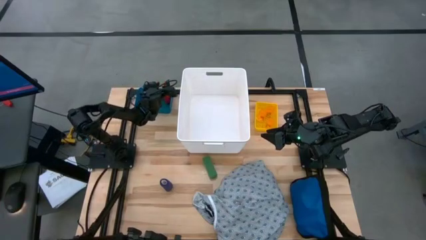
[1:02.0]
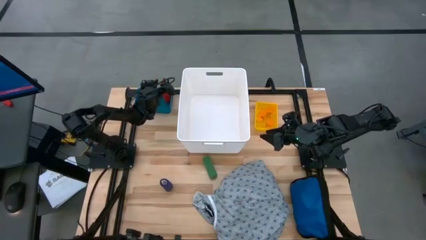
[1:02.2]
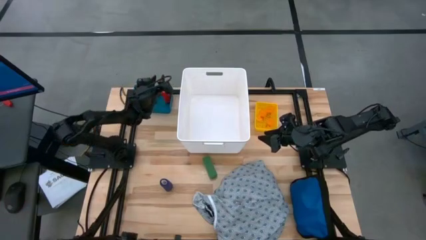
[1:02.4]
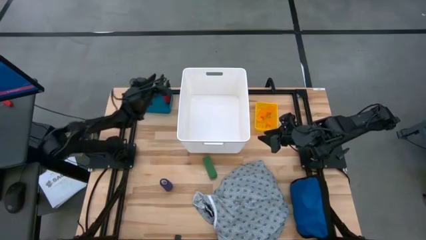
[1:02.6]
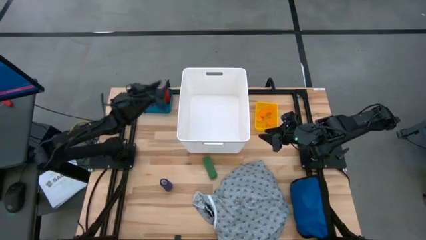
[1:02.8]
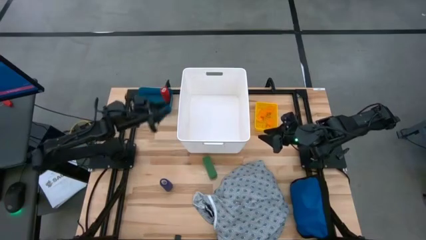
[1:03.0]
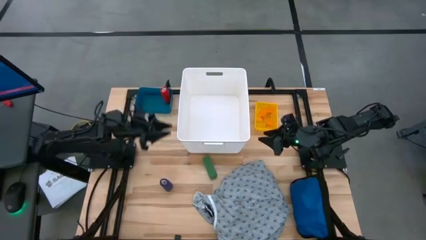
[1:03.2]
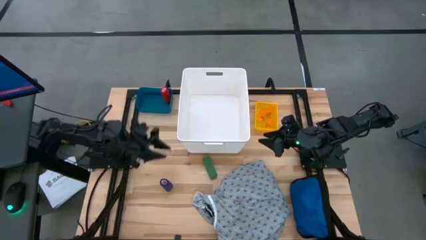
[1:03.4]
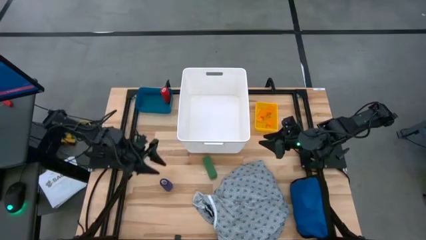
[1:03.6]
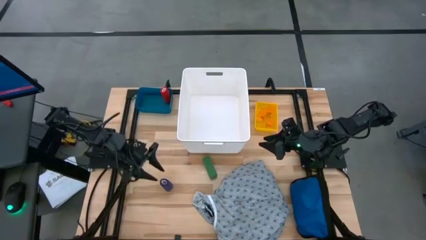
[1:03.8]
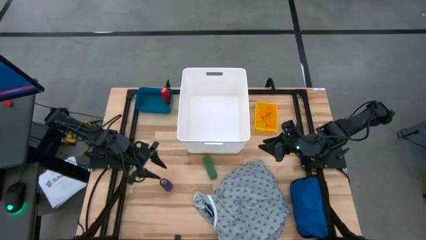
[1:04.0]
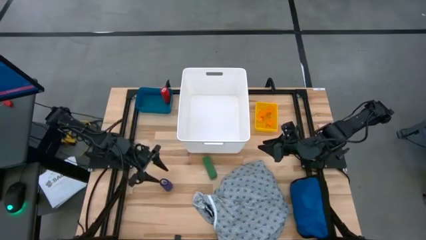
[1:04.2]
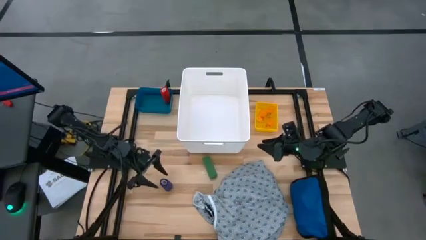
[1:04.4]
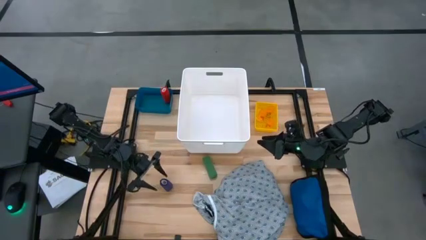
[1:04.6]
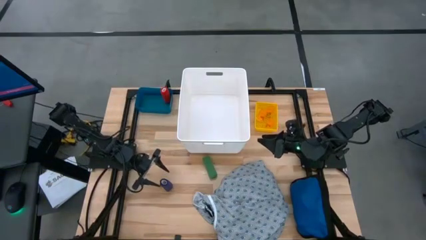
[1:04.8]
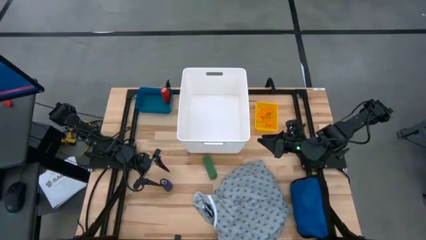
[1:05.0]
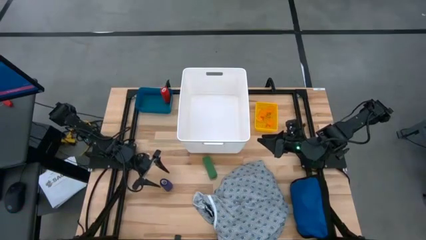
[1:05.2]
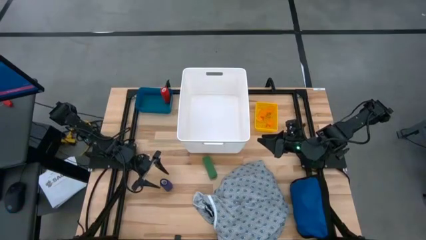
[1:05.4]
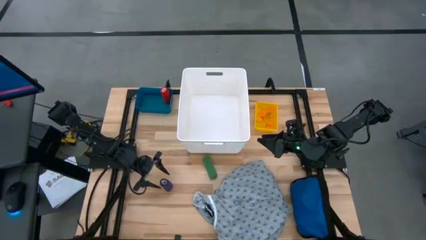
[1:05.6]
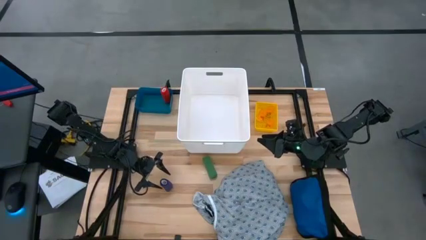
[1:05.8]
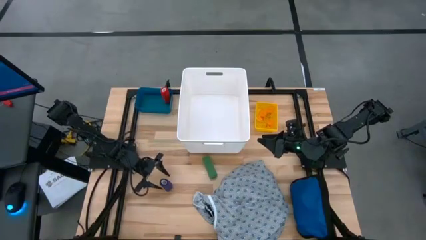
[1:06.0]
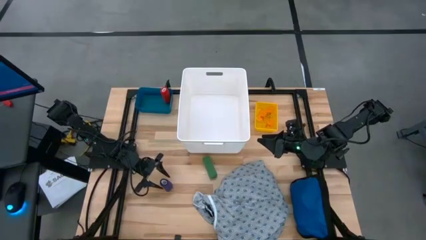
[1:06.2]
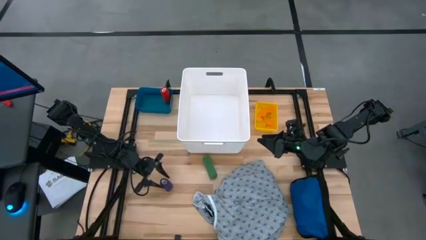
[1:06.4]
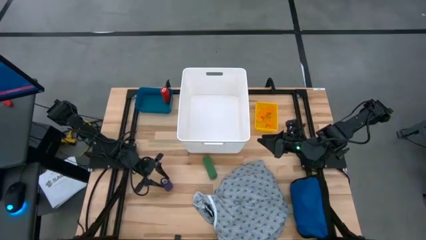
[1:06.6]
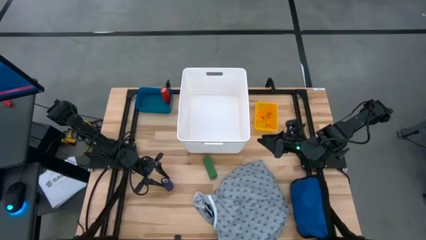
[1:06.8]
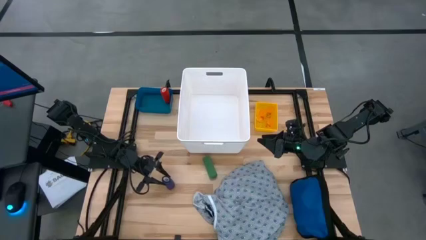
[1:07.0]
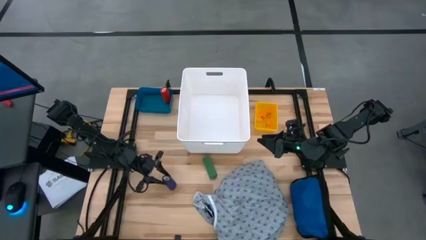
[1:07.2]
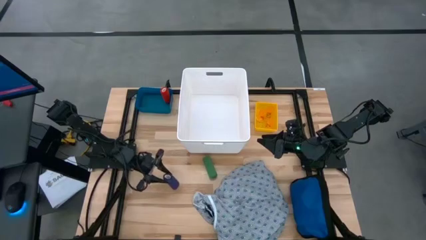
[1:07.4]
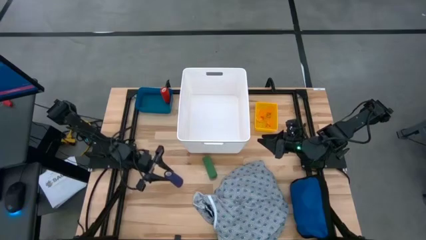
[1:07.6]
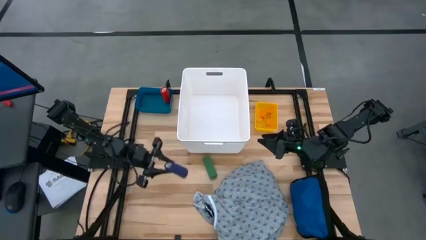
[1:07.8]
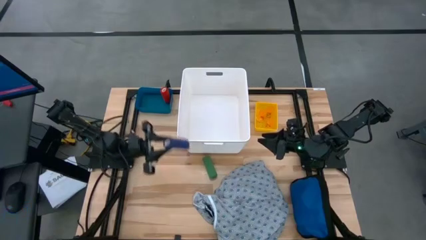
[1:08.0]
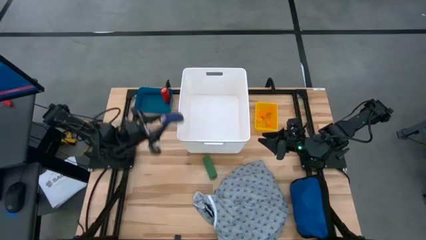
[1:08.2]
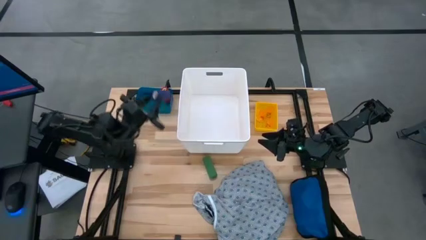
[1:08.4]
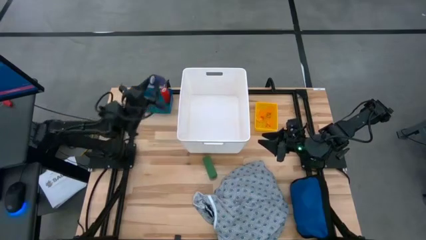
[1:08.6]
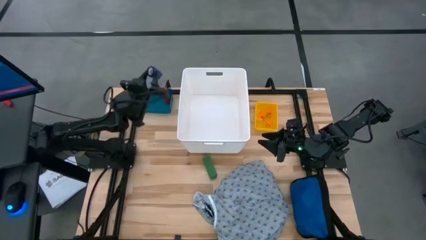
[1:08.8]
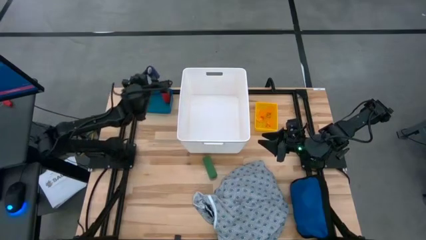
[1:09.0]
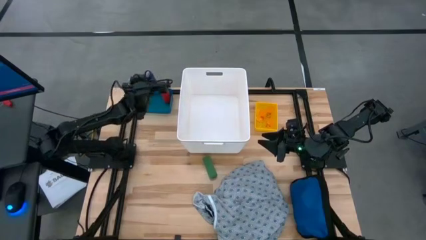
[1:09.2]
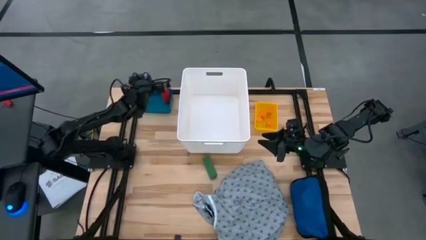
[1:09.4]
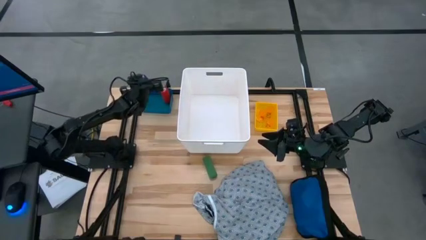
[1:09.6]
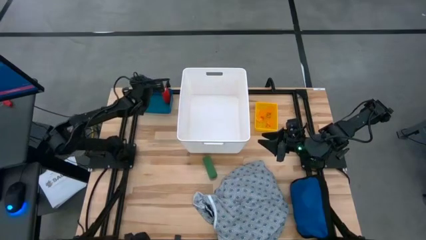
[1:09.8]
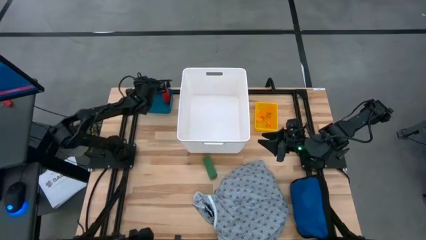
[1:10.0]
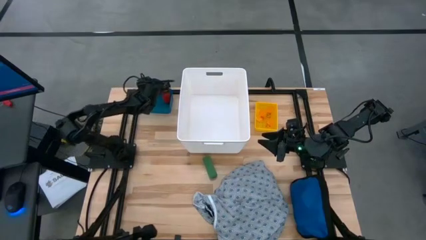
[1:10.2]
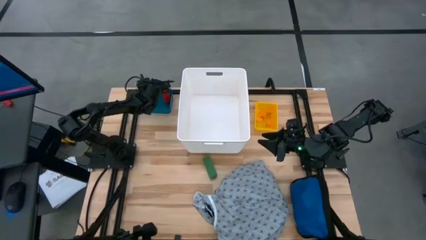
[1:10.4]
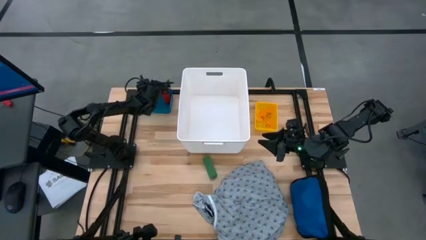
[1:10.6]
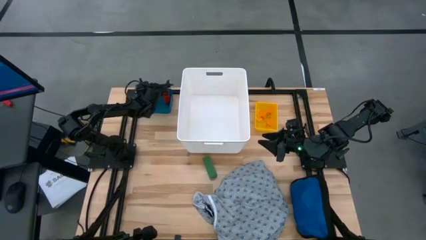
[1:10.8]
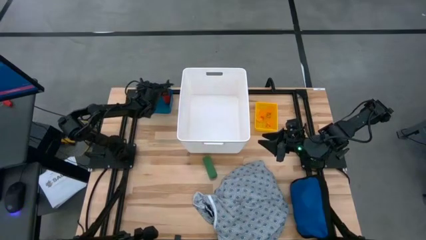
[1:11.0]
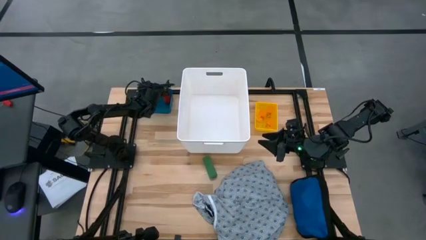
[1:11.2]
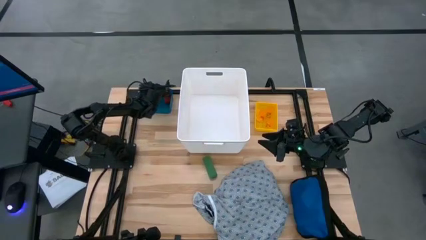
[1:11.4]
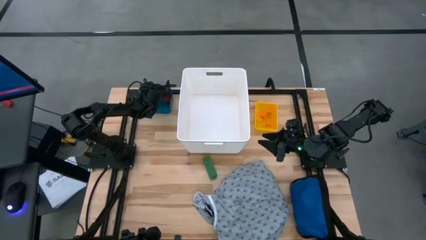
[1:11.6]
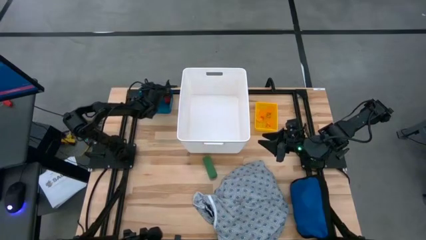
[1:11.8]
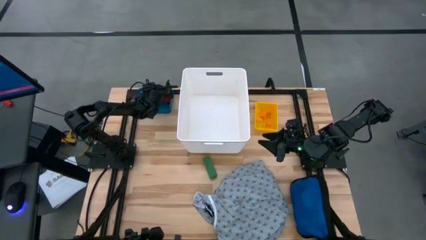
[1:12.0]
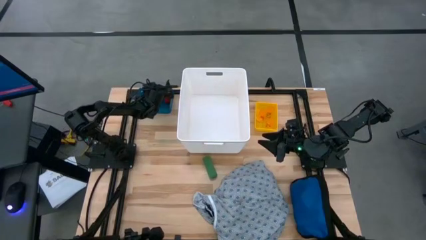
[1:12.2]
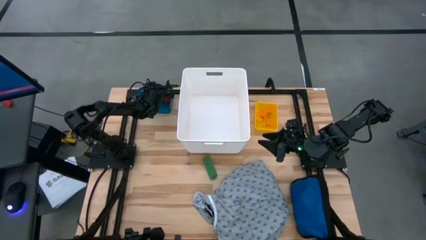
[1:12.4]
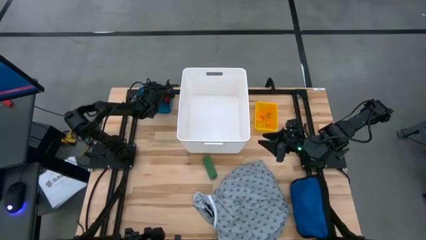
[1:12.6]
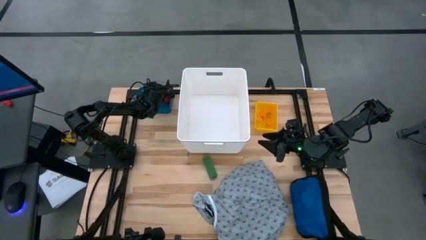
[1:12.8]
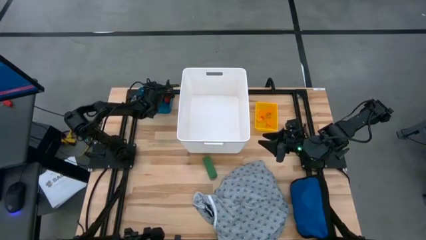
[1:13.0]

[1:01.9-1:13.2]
Task: Pick & place medical supplies in basket/bin
Put the blue bandage into the blue bin

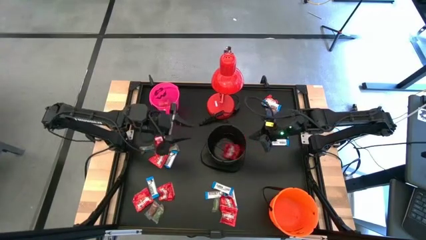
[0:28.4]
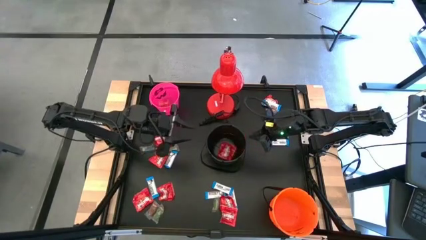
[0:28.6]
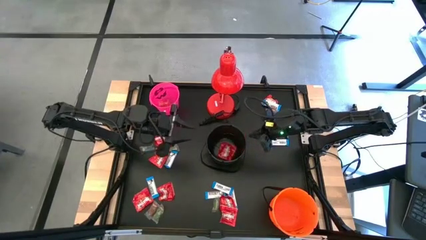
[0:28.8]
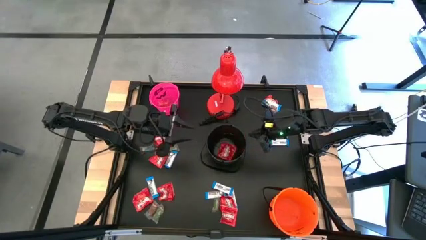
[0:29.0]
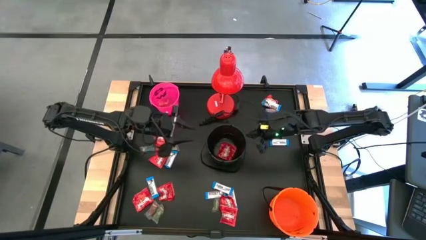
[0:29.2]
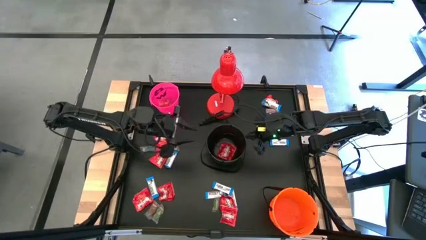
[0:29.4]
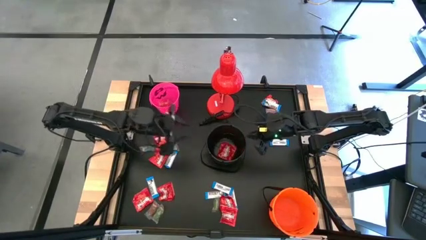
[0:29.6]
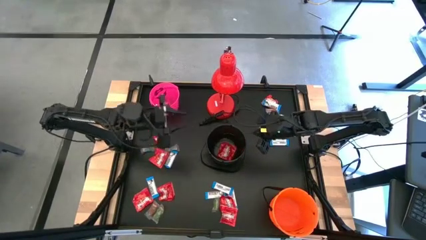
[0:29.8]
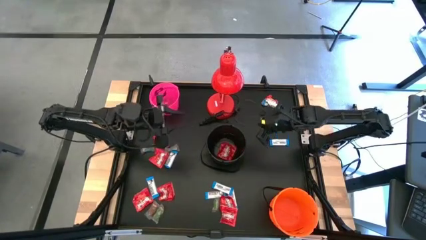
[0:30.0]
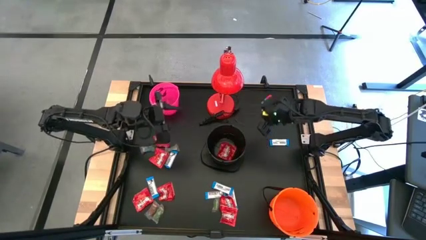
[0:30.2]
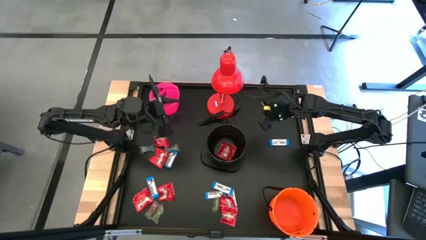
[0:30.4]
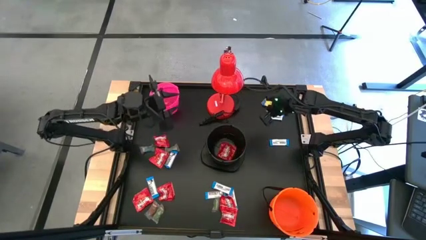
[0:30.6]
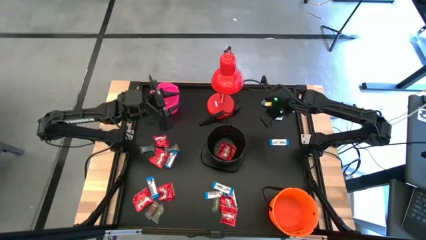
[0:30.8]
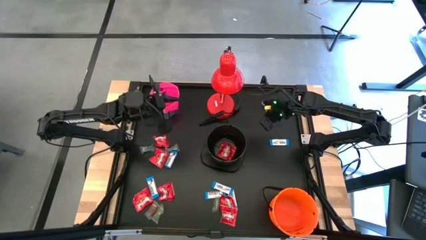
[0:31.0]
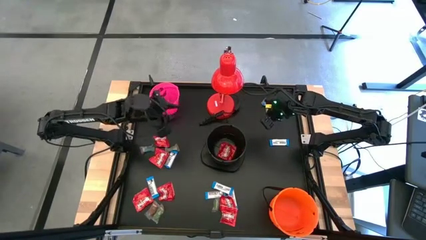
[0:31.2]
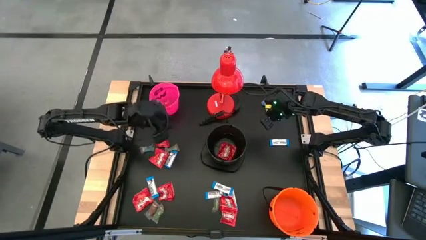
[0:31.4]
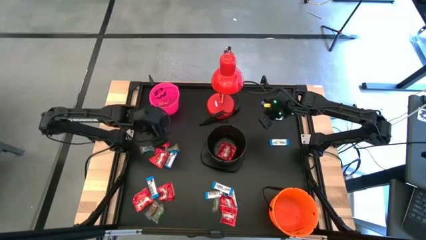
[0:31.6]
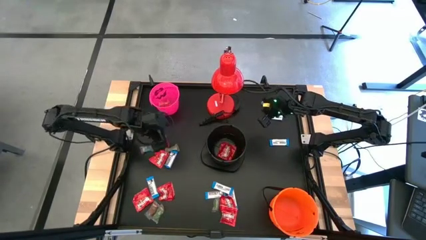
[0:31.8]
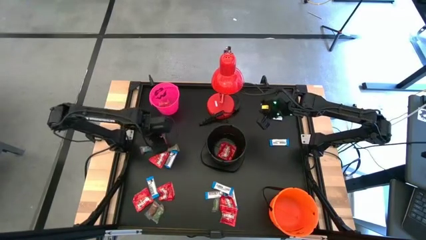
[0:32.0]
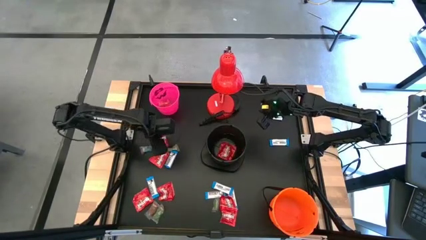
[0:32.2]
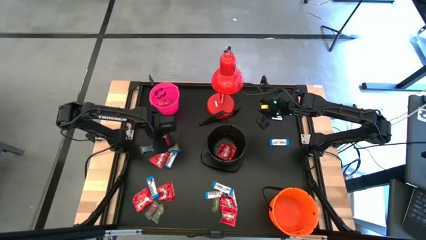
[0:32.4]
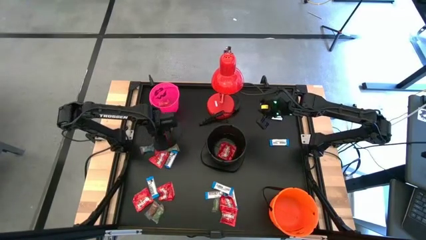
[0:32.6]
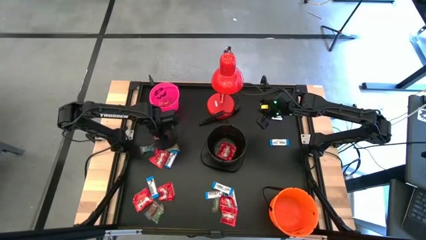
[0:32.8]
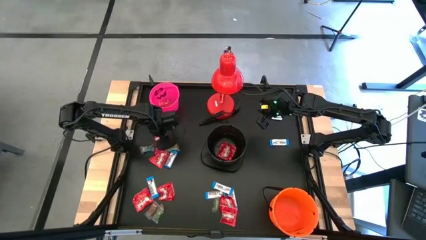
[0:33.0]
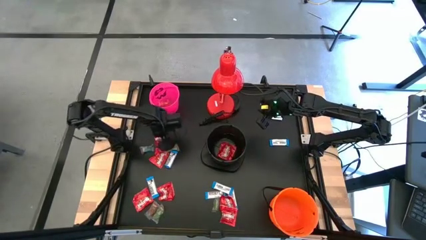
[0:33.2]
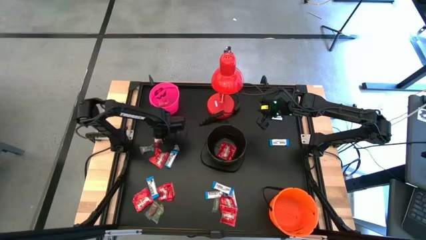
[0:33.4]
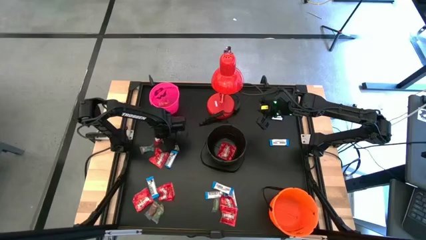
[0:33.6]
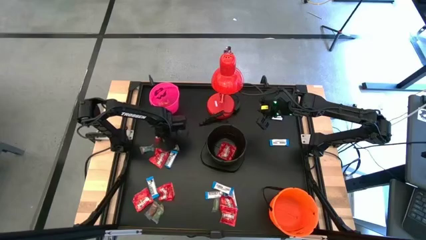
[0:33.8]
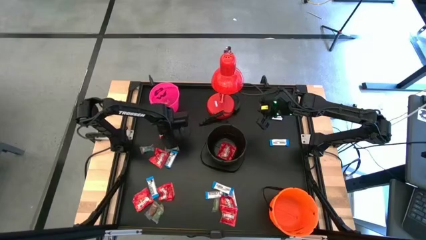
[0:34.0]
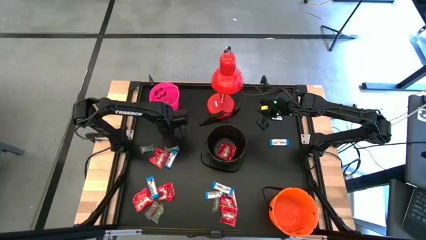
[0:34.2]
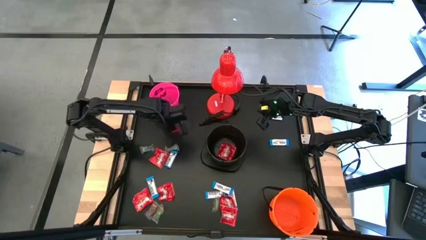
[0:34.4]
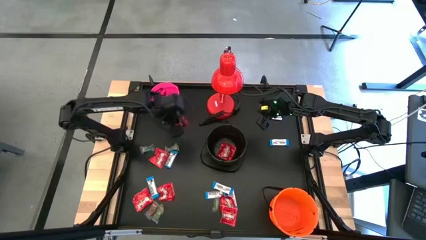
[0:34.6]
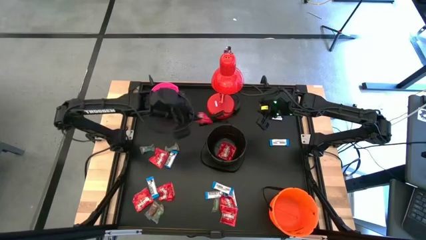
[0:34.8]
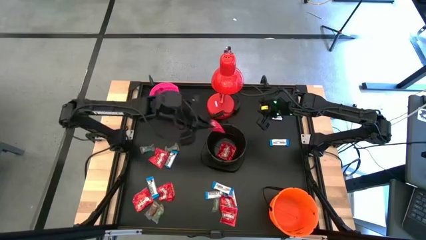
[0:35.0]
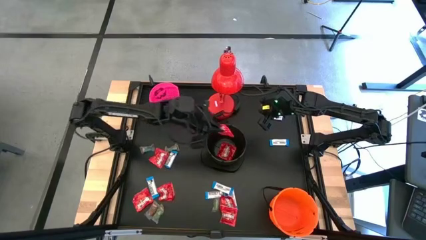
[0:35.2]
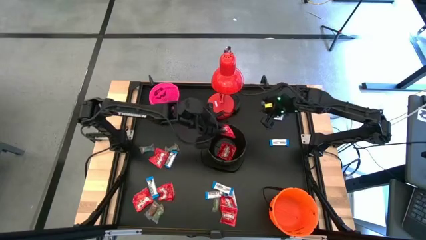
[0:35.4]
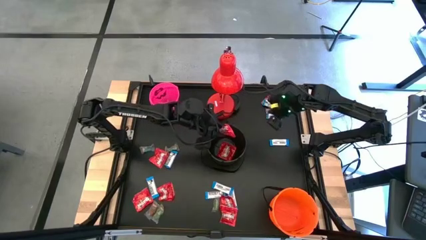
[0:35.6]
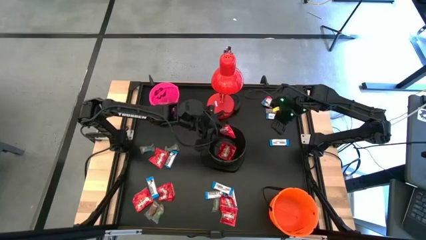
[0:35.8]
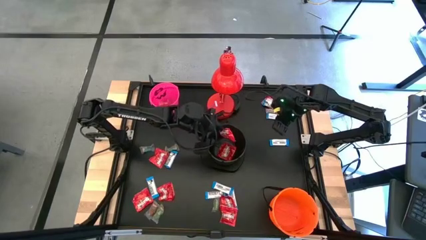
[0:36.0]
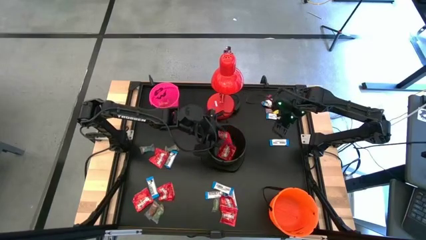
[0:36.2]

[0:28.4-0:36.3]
Task: Organize candy in baskets
Put the red candy into the black bucket
